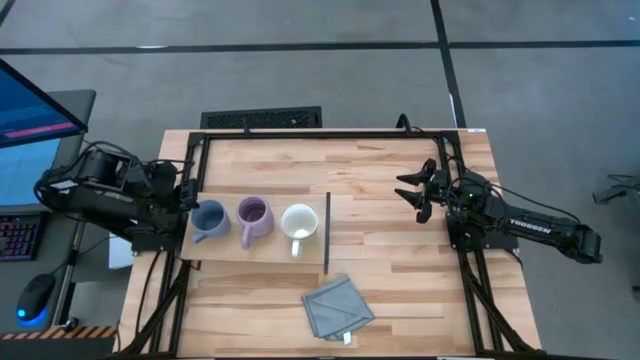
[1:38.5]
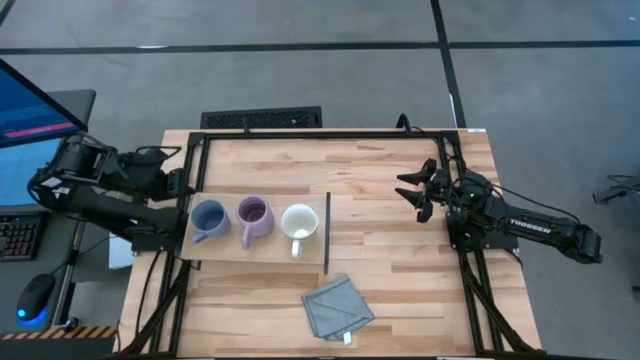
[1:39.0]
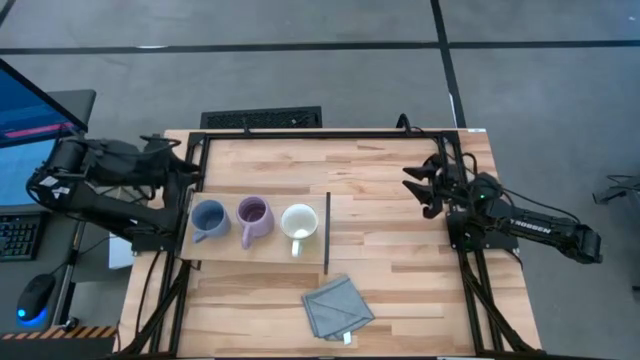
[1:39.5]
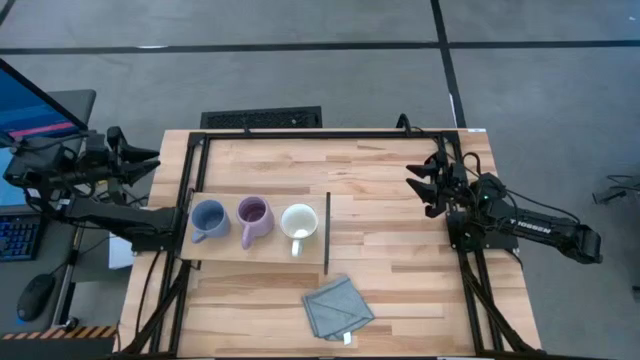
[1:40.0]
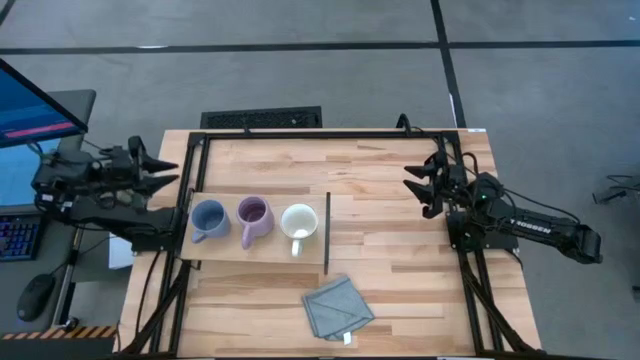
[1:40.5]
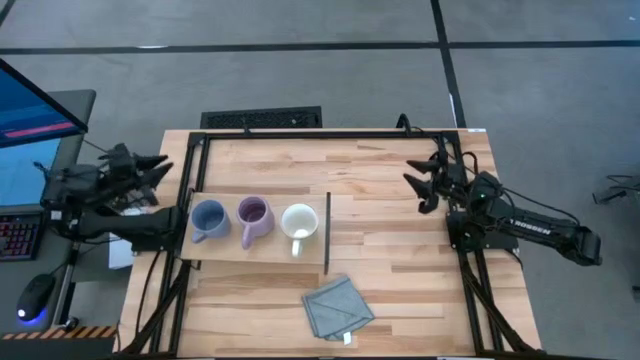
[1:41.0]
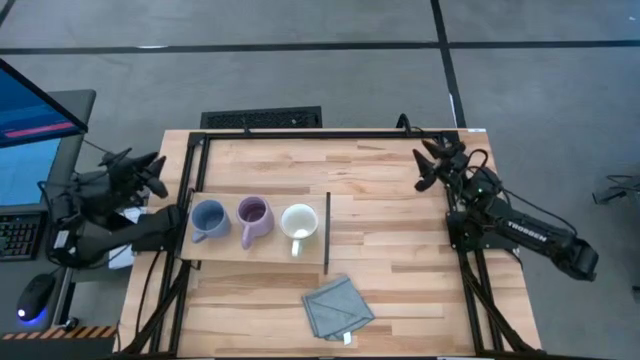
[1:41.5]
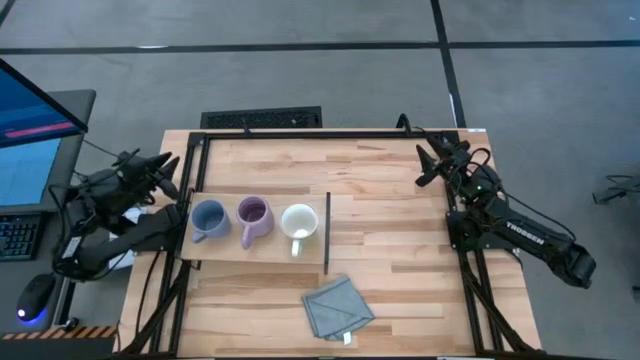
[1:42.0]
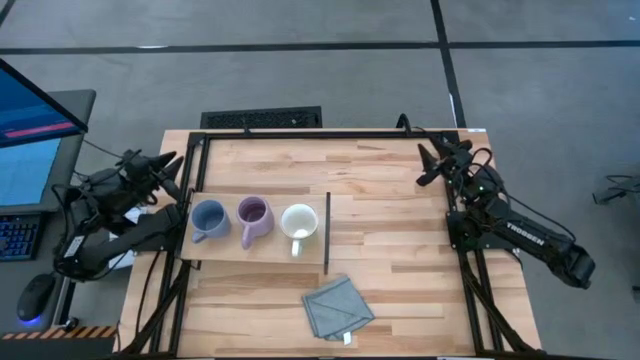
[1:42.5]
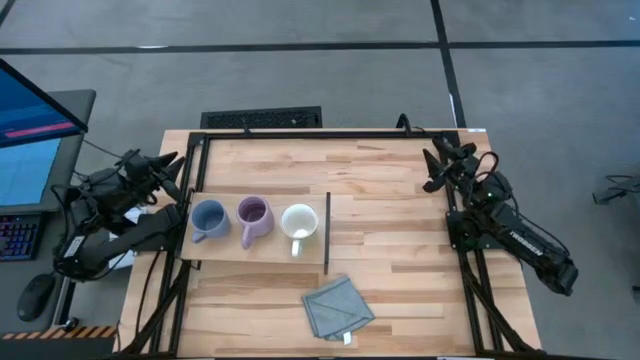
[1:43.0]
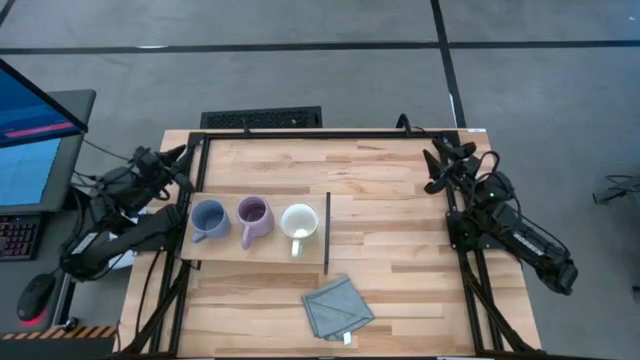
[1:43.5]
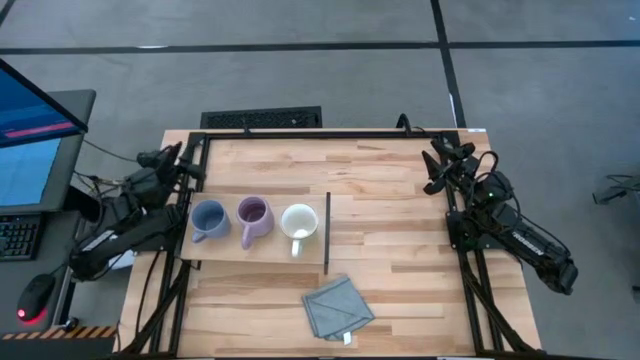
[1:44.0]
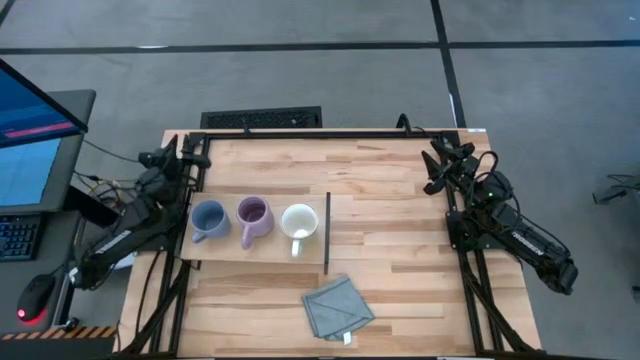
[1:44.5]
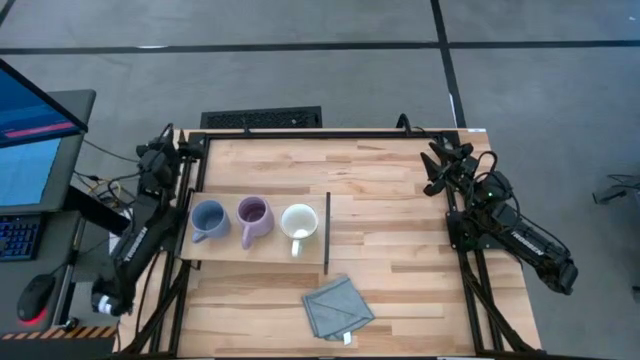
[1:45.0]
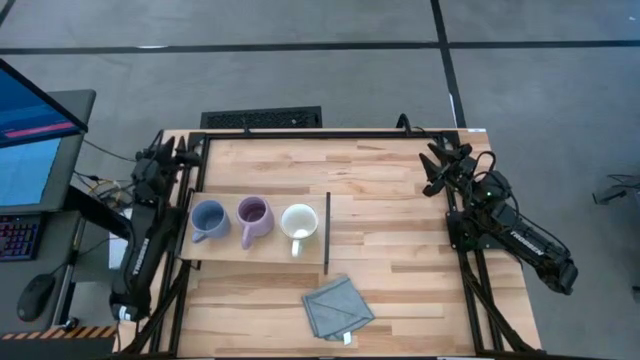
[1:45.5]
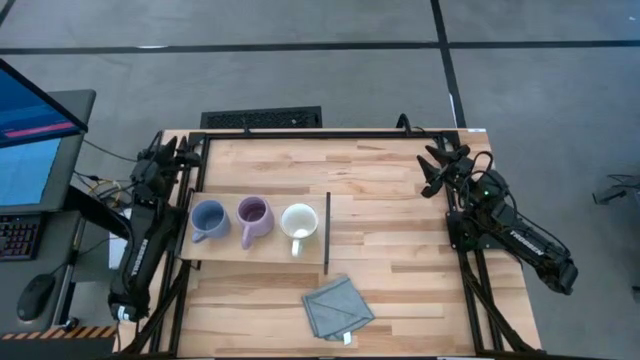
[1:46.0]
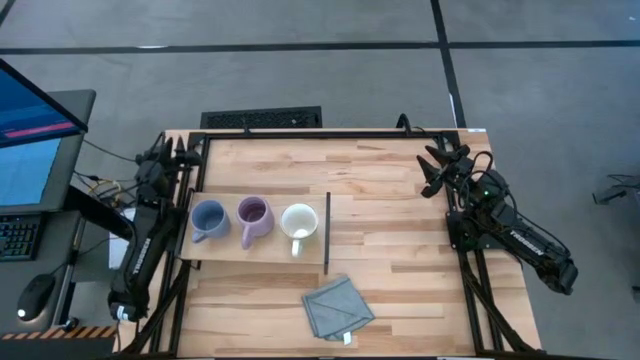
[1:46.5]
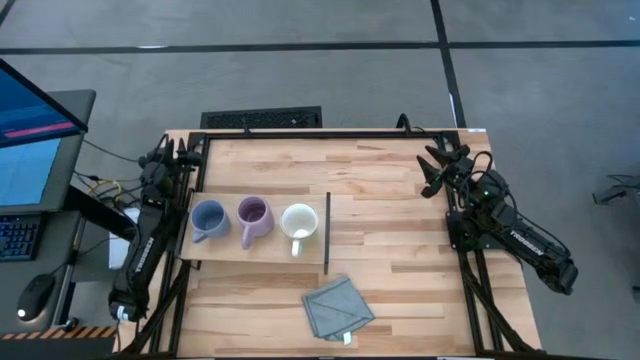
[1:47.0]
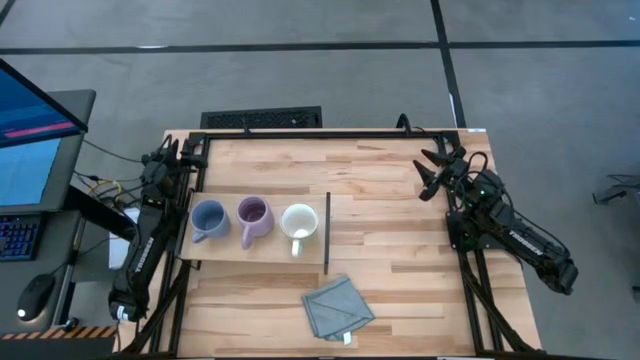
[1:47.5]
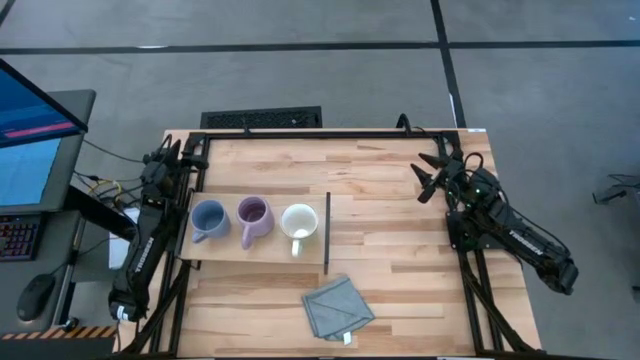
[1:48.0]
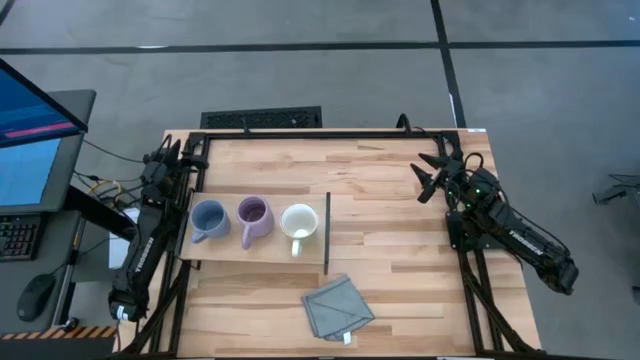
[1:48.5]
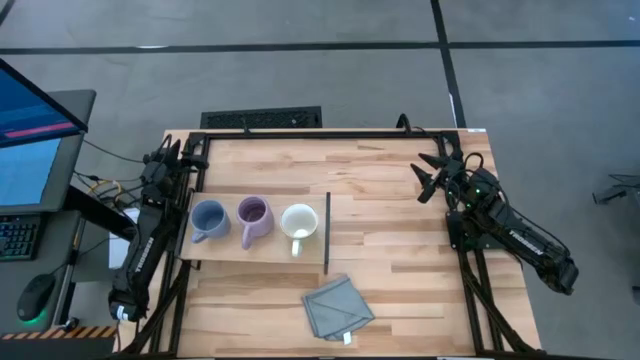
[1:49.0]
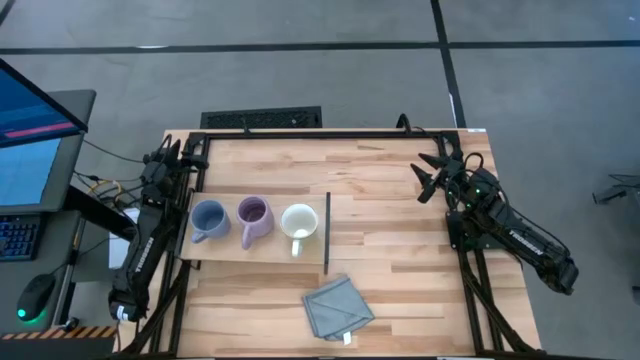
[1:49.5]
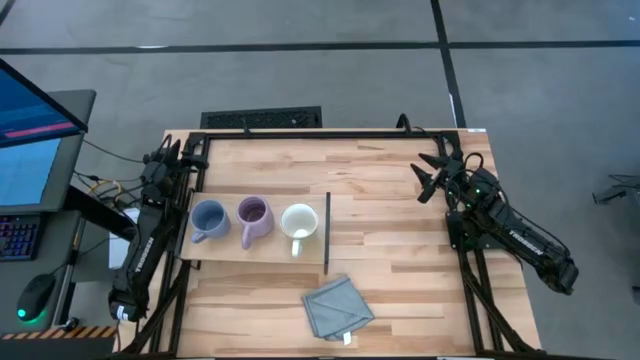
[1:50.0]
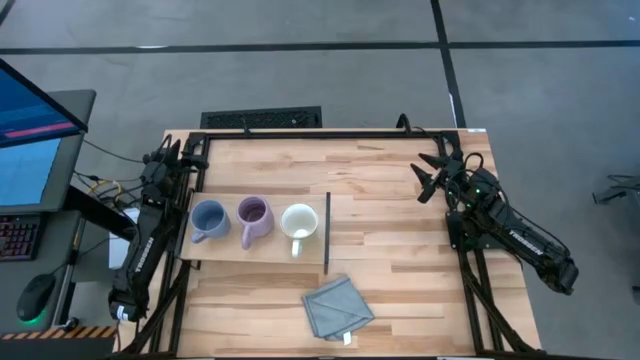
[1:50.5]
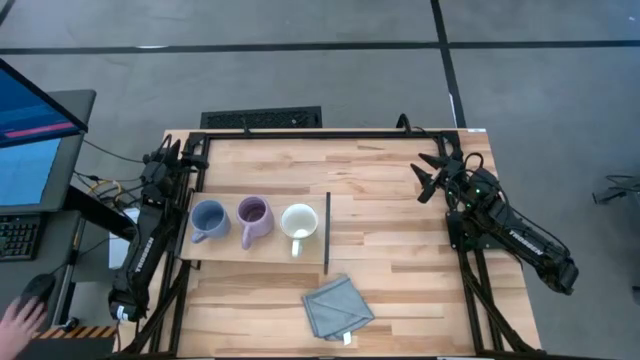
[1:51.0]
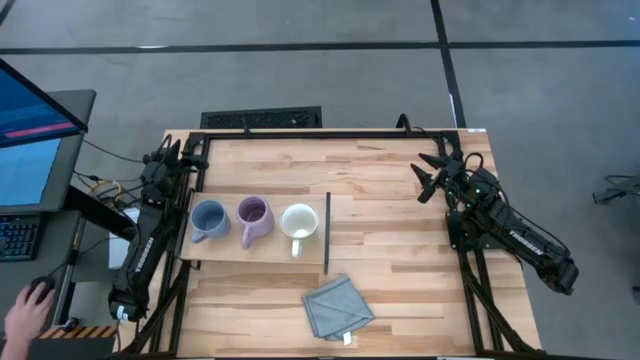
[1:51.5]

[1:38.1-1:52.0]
Task: Stack small to large cups/mugs on shelf
Return to Home Position

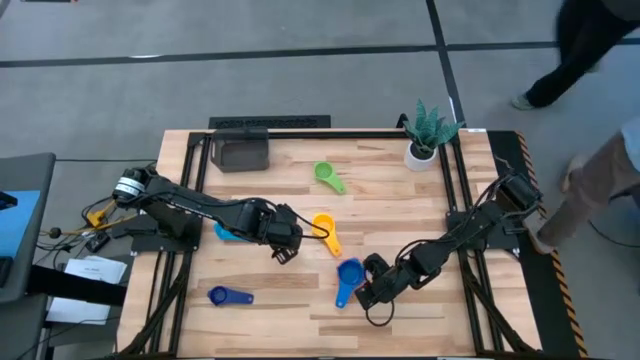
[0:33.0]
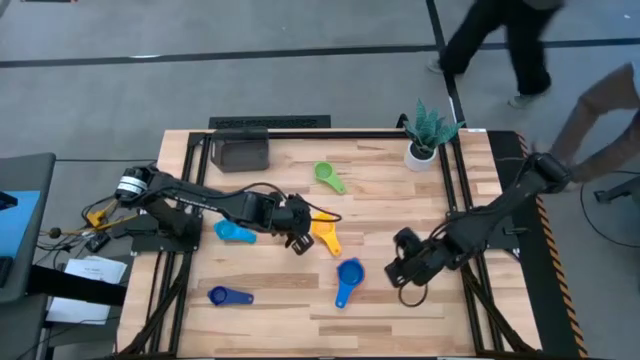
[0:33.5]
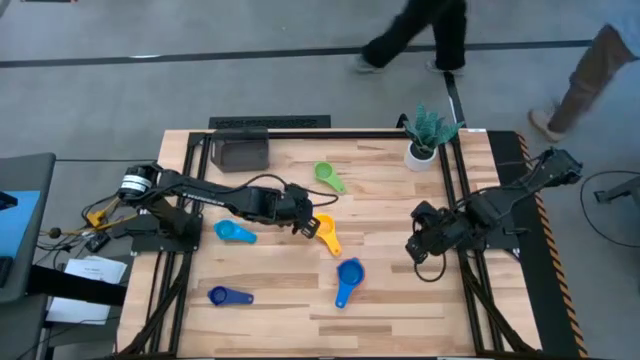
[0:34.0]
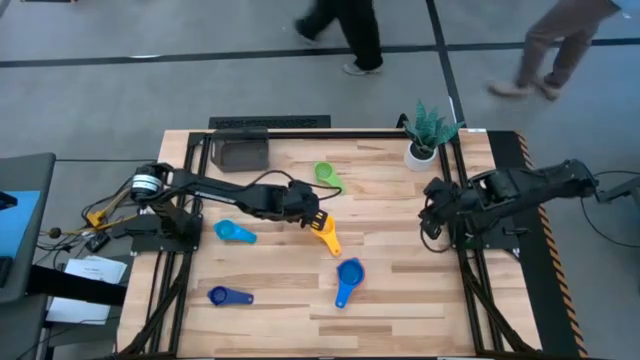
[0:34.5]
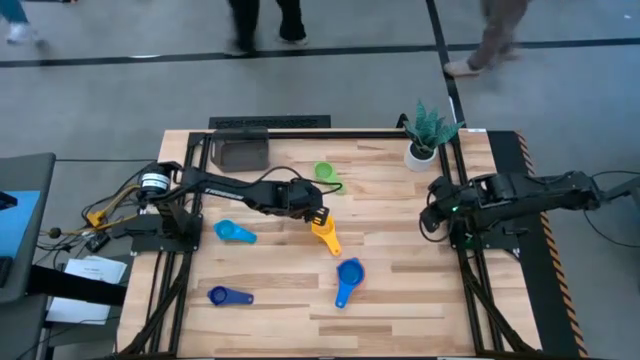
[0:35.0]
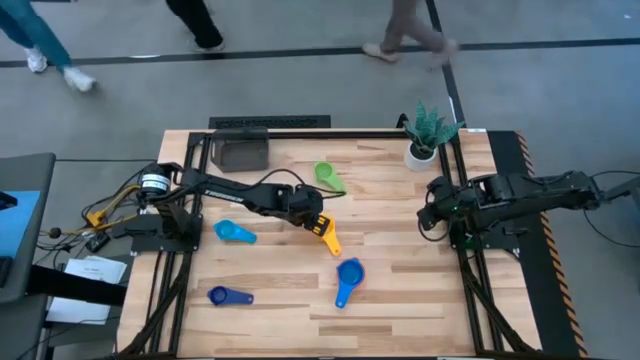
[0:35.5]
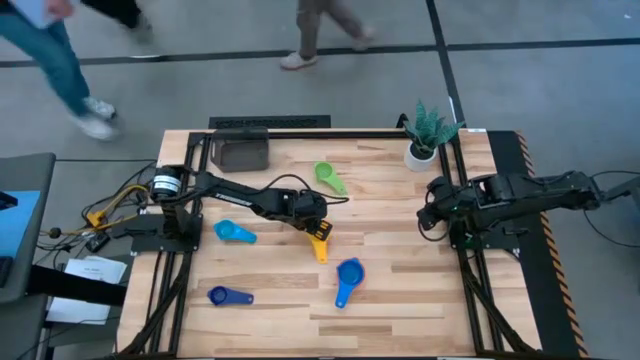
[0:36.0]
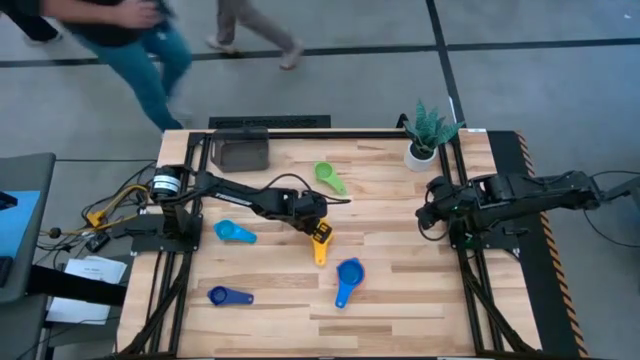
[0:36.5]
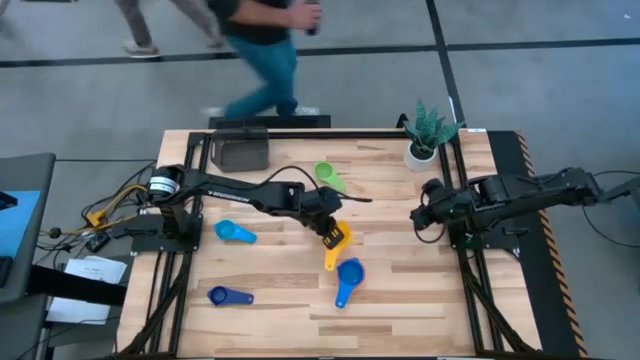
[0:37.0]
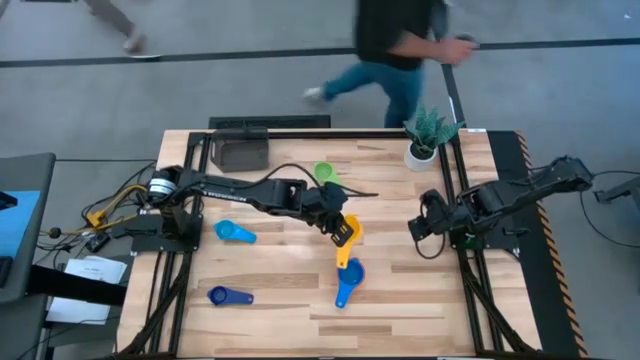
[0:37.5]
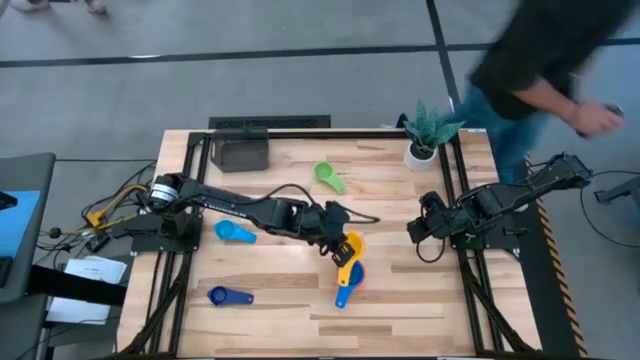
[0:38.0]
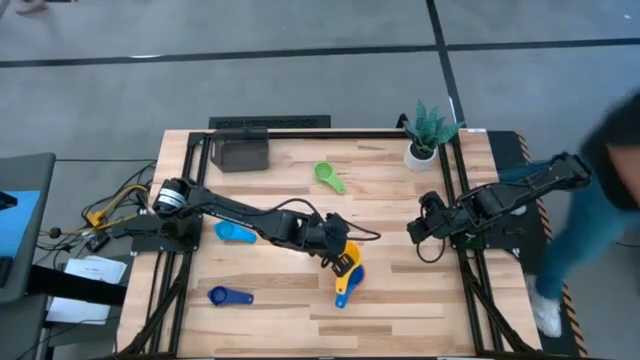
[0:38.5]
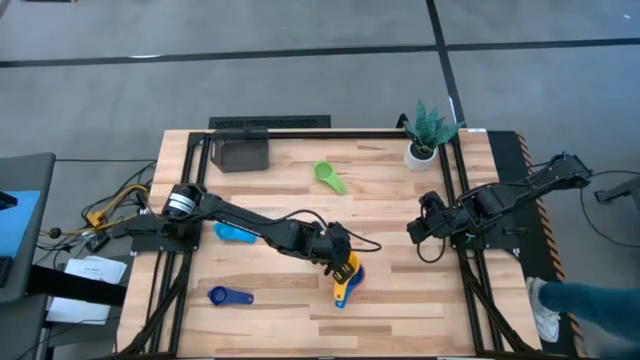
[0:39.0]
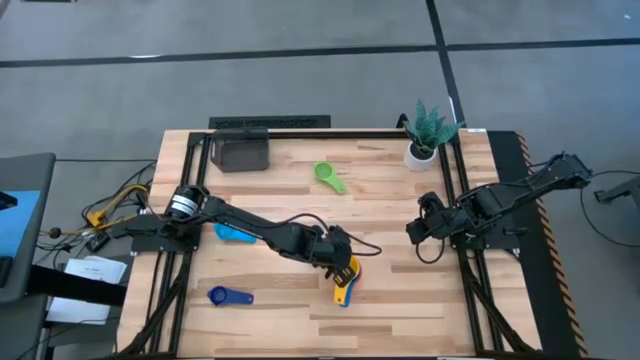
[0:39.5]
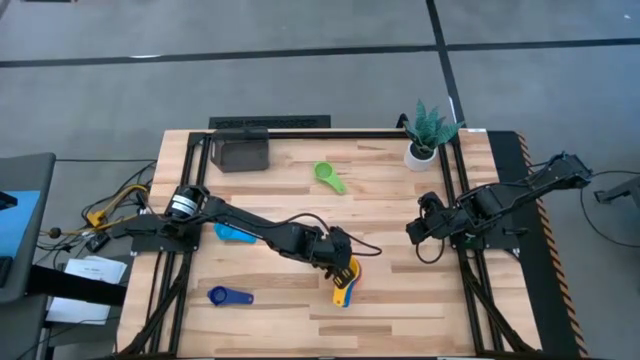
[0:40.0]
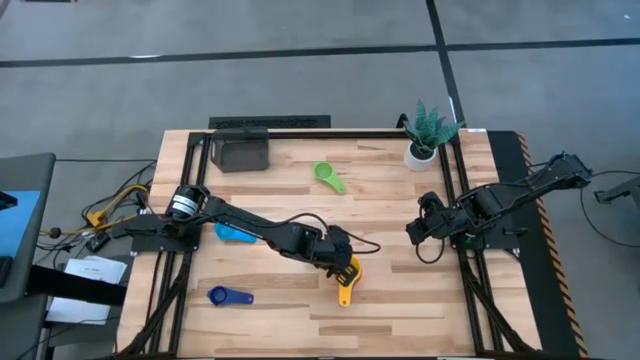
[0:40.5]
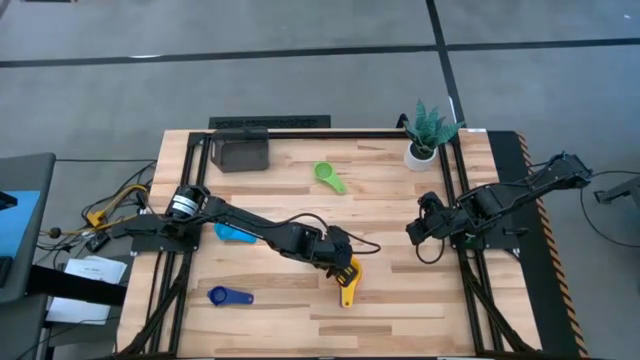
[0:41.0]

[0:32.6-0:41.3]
Task: Nest measuring cups in basket
Stack the yellow measuring cup on top of the blue measuring cup
